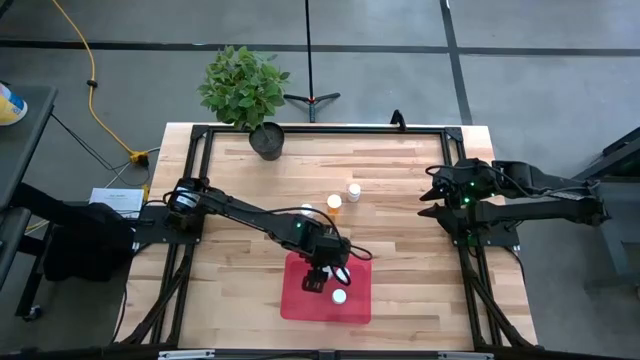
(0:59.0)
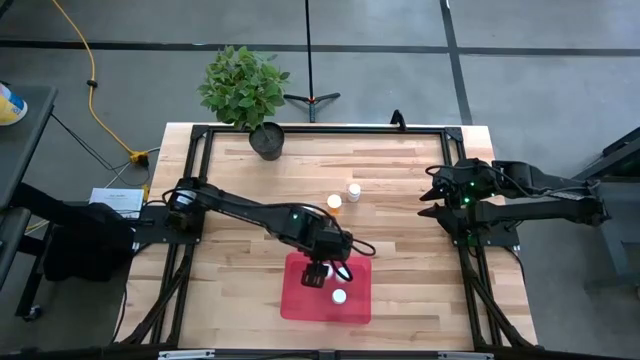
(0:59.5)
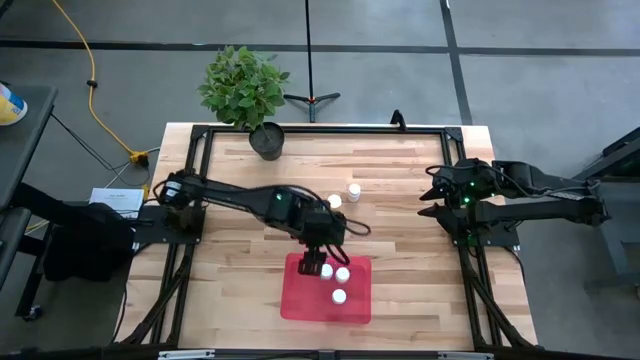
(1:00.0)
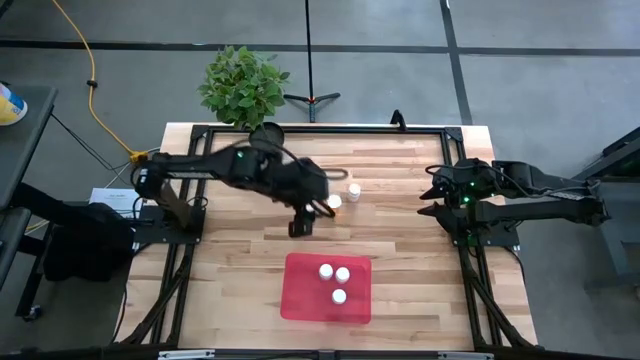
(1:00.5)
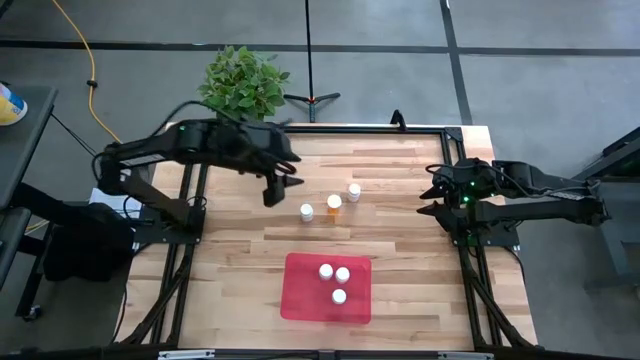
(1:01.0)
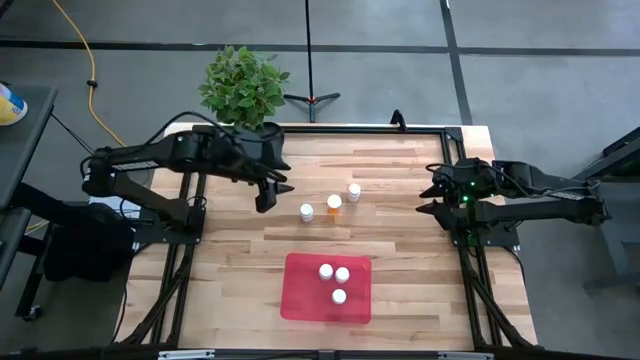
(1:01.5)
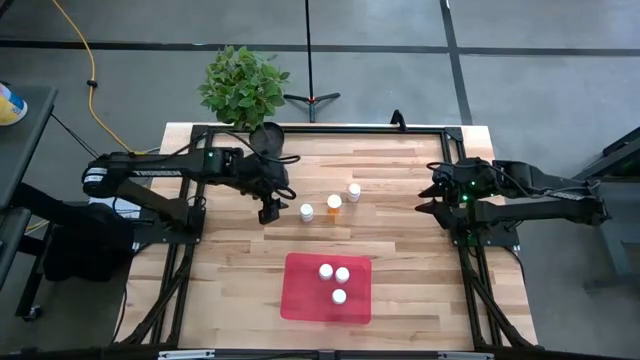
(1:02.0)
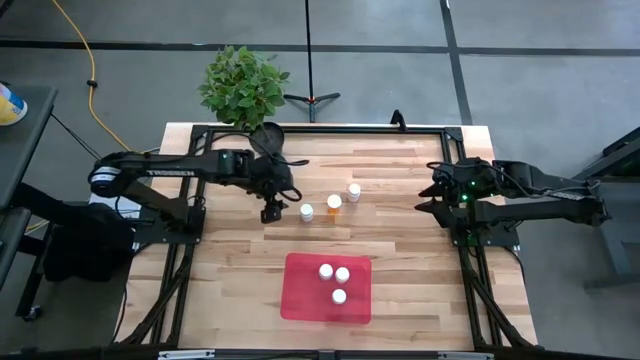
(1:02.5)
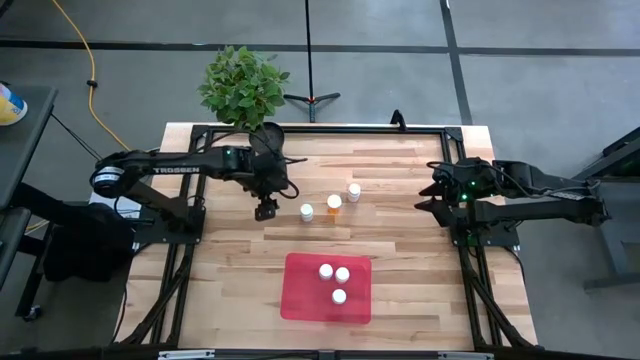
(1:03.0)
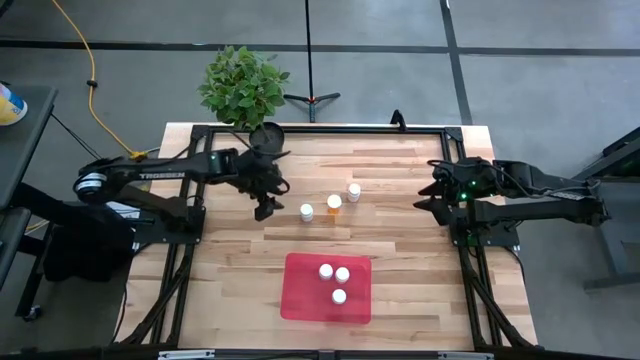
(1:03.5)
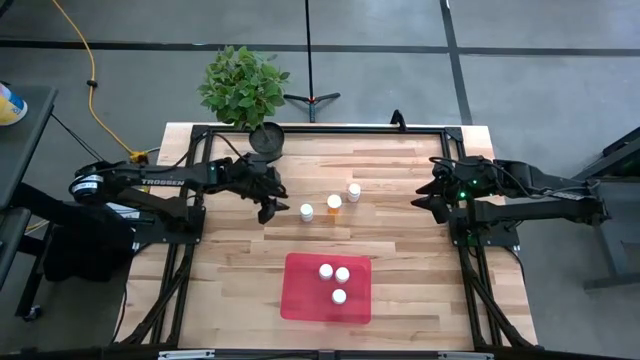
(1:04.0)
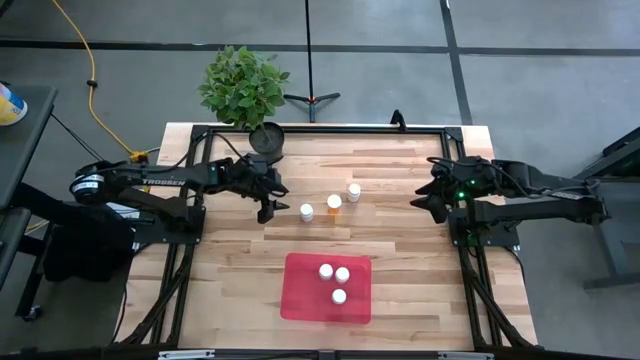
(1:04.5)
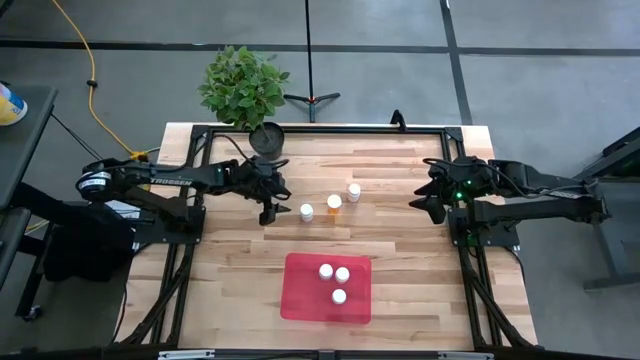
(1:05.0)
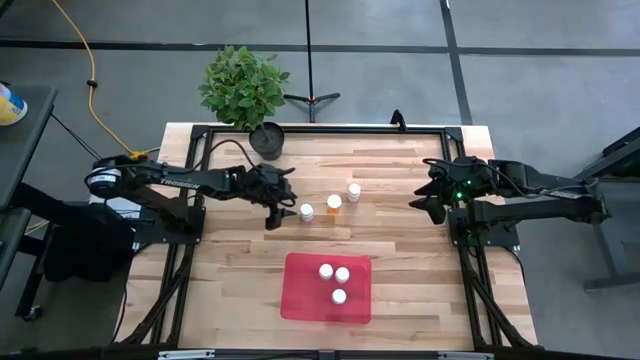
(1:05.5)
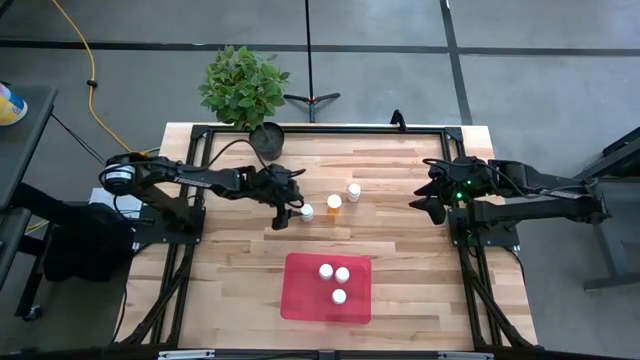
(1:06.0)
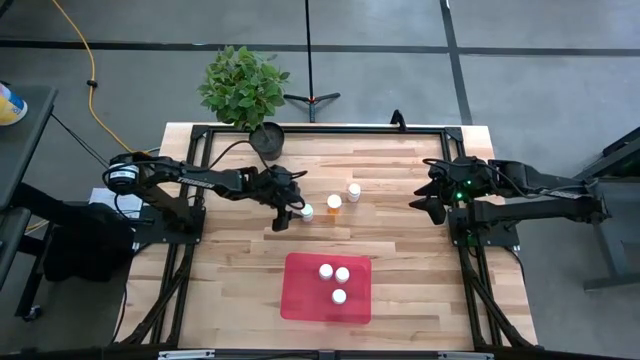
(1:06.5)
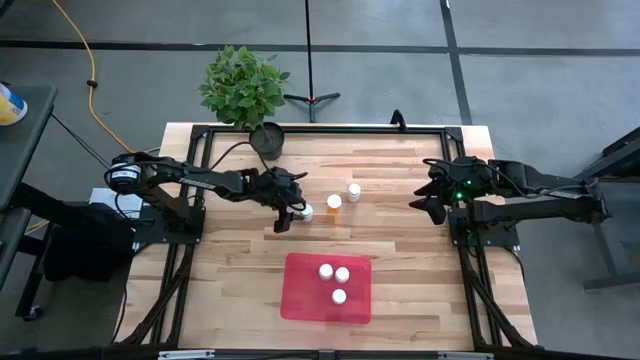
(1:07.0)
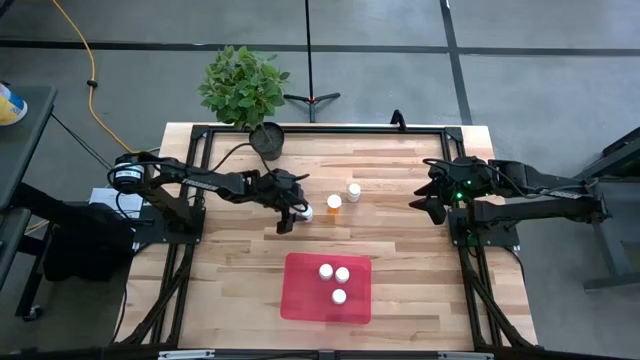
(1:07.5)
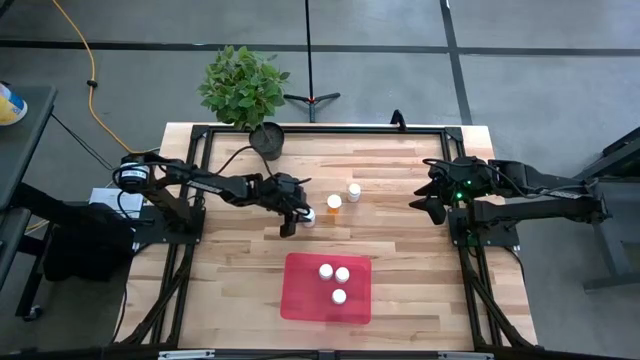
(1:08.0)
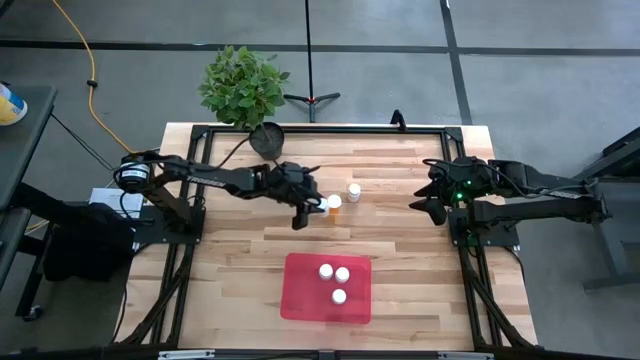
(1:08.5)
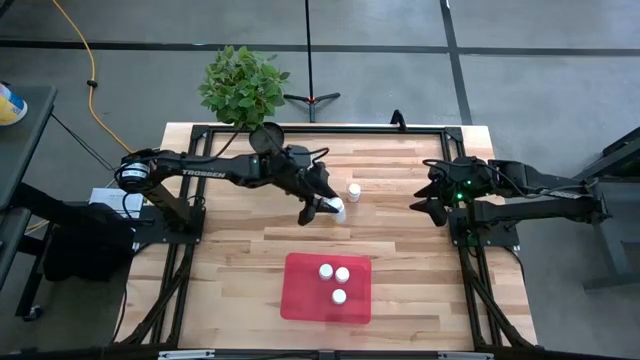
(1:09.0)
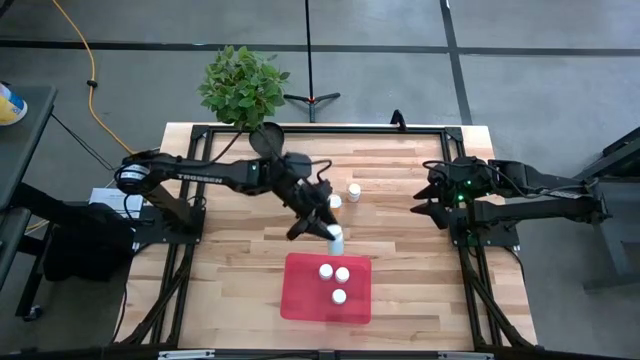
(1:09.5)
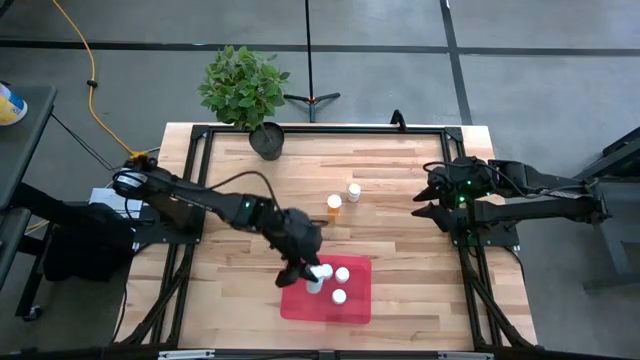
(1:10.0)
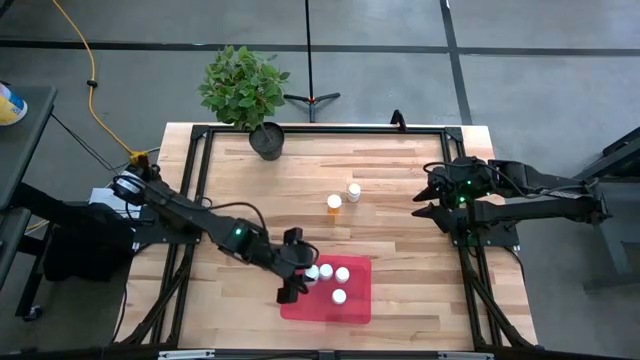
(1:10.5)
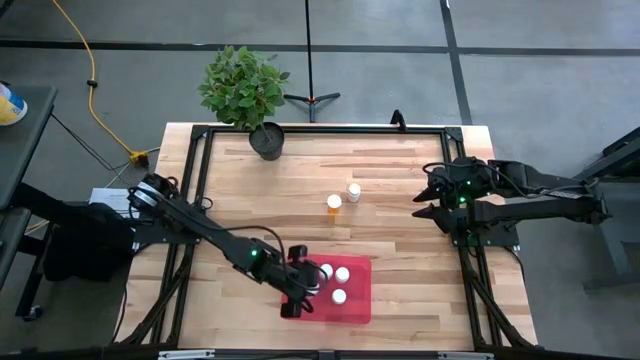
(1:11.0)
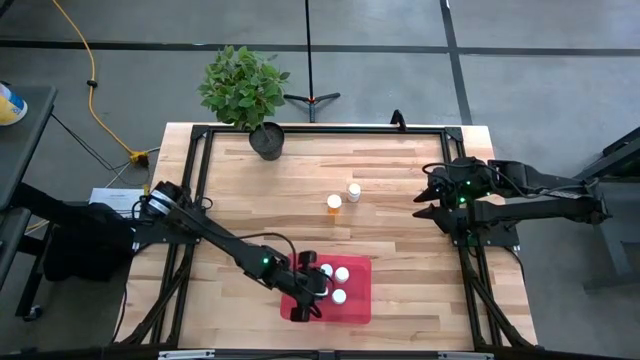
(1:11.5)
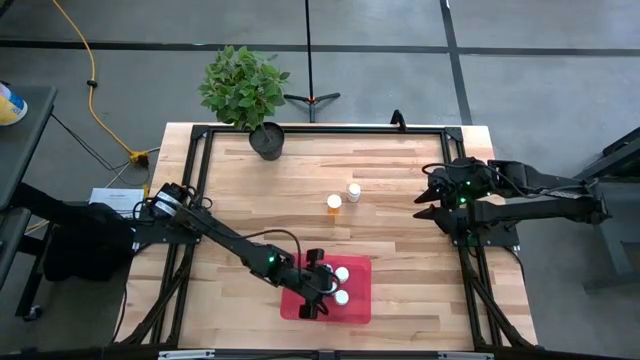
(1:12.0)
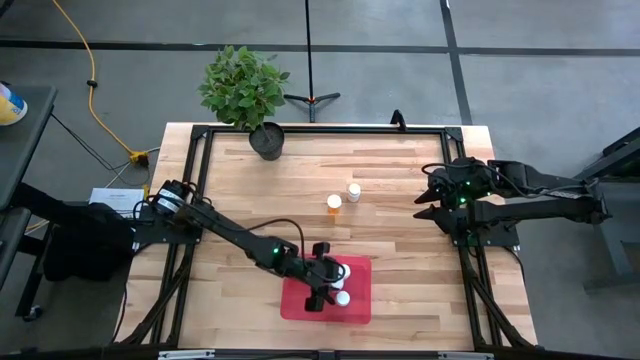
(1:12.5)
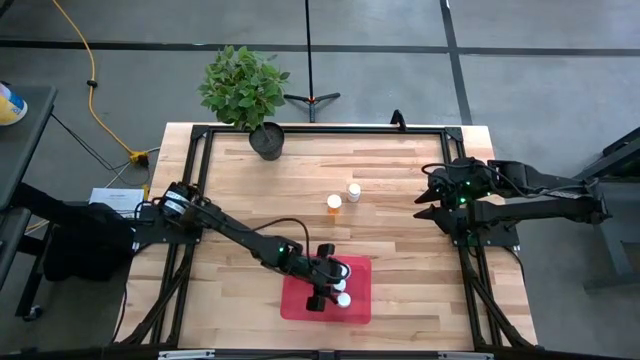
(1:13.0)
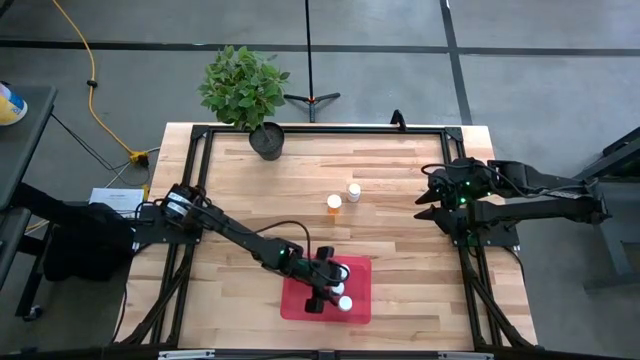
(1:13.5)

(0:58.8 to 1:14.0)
Task: Pick and place pill bottles into a basket
Put the white pill bottle into the red bin

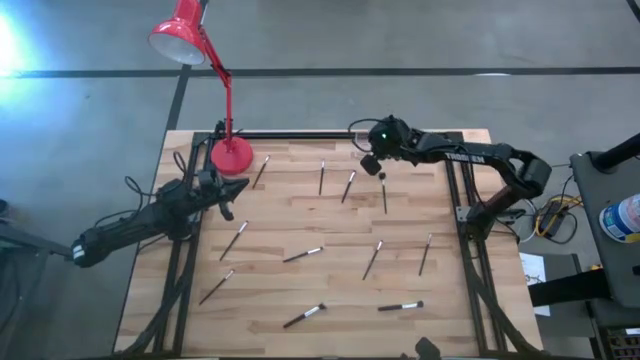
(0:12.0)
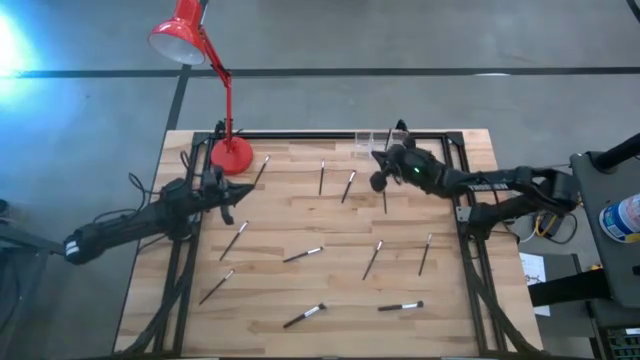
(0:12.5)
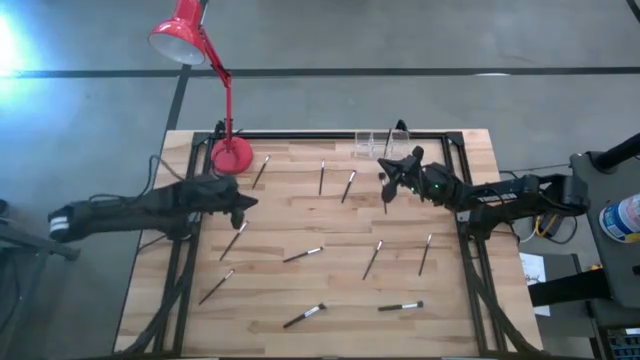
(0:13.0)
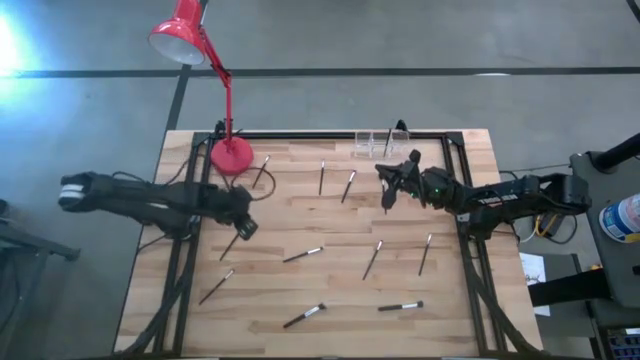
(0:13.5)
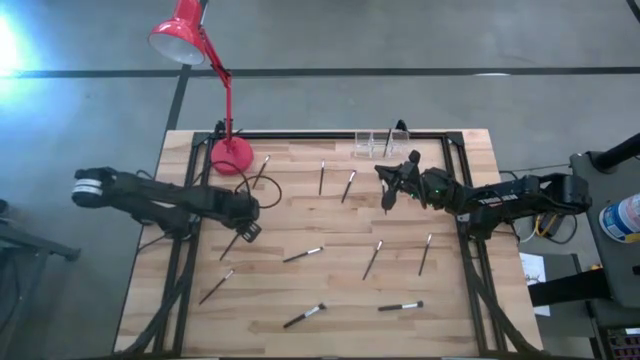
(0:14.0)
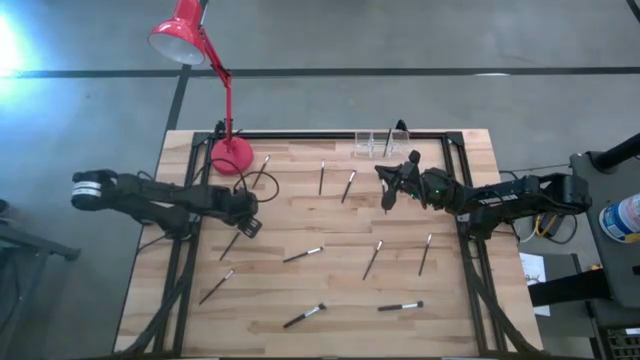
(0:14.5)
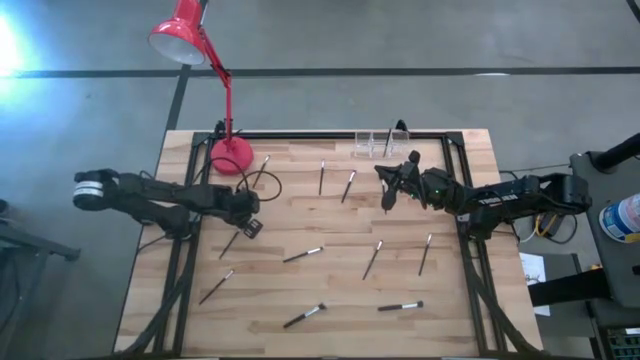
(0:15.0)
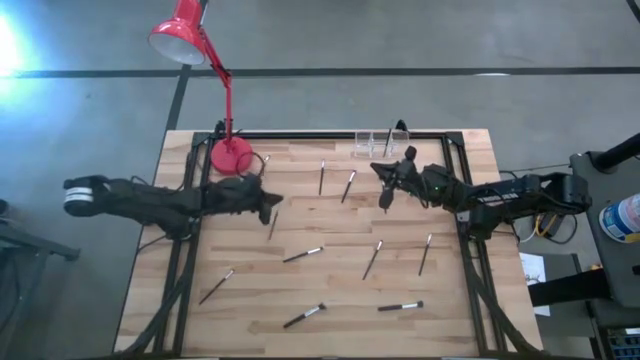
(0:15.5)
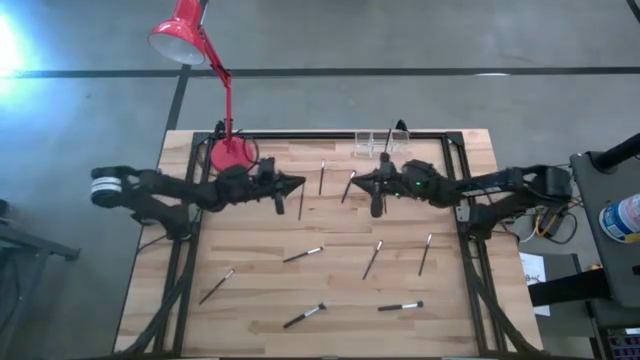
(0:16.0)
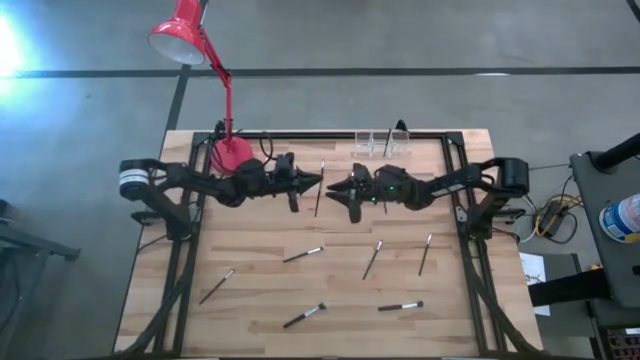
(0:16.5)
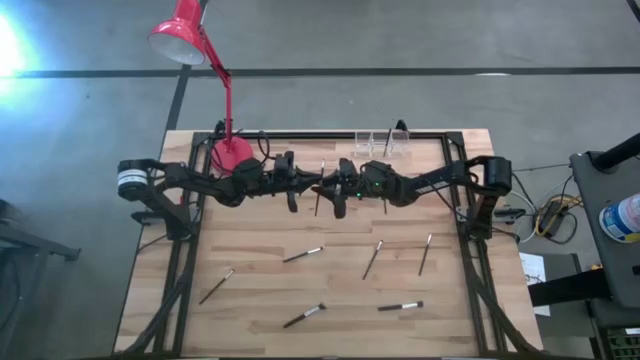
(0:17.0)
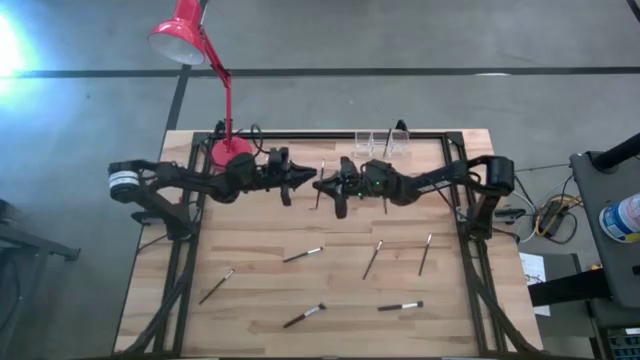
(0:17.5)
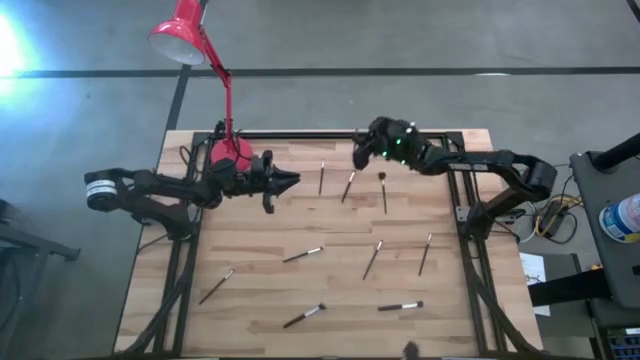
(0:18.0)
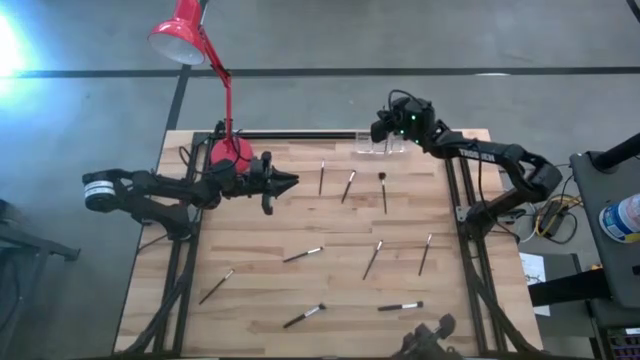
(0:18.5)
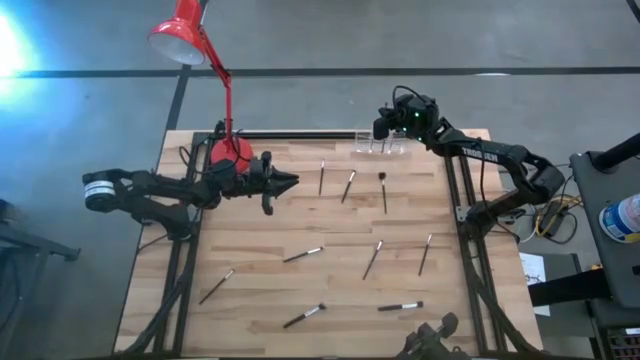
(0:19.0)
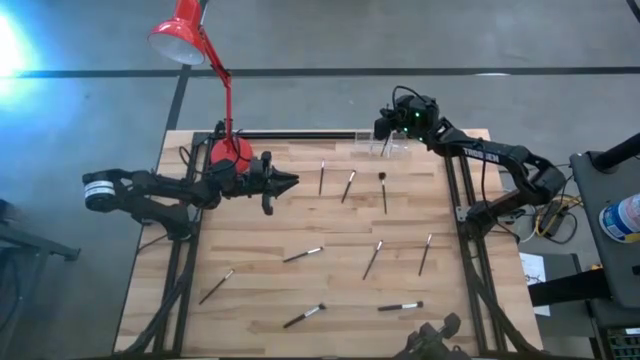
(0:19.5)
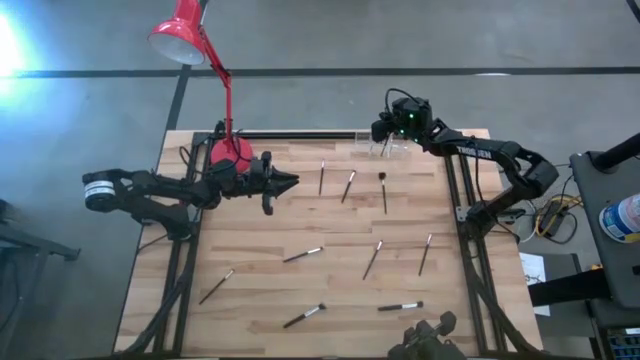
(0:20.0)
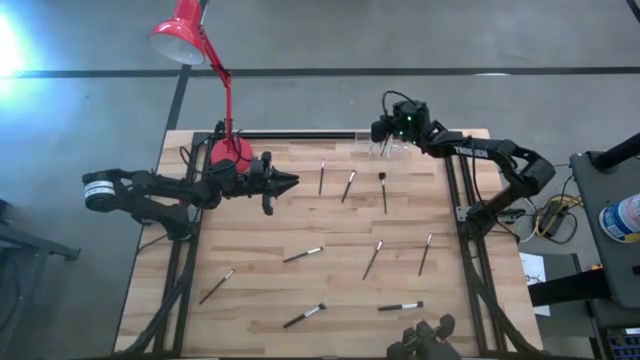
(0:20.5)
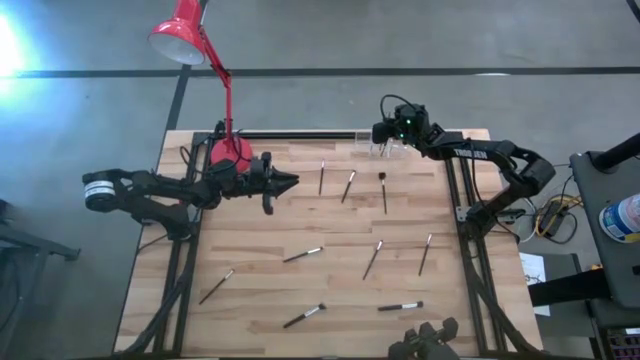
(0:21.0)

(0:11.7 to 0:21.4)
Task: Put items in baskets/containers
Put the eyeshadow brush into the transparent organizer
